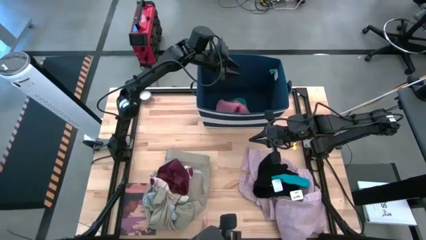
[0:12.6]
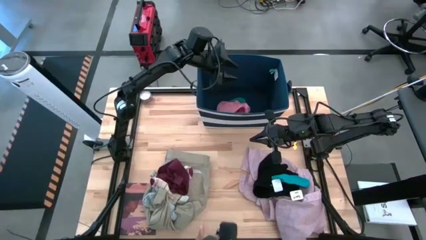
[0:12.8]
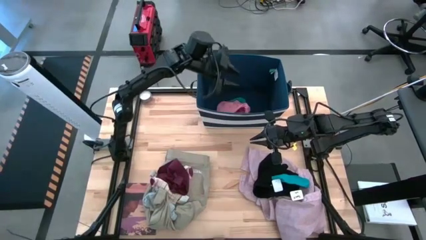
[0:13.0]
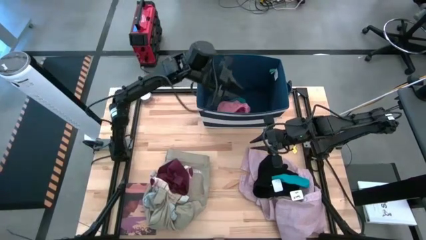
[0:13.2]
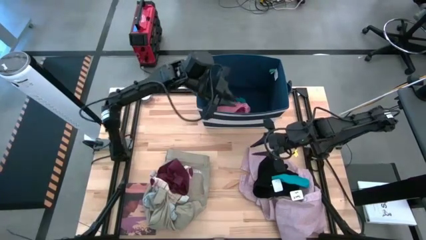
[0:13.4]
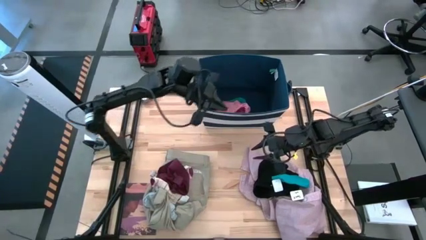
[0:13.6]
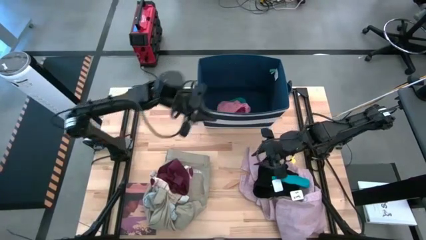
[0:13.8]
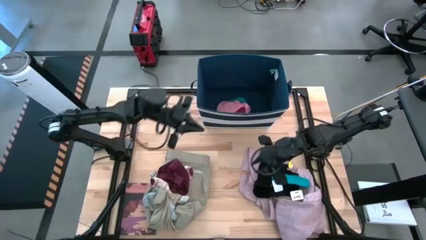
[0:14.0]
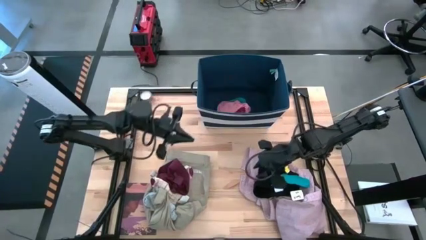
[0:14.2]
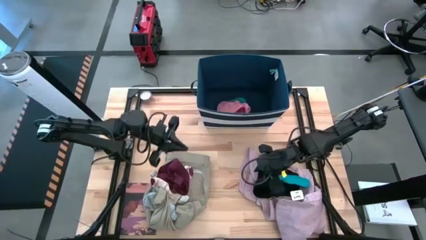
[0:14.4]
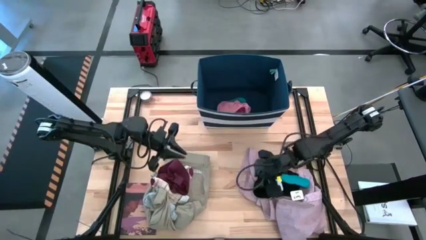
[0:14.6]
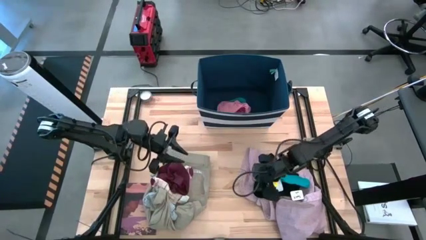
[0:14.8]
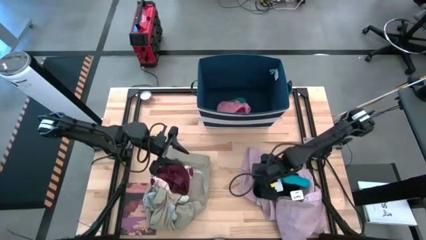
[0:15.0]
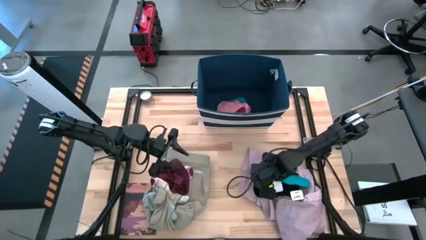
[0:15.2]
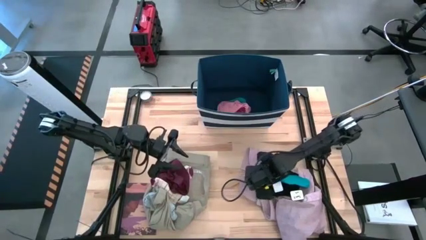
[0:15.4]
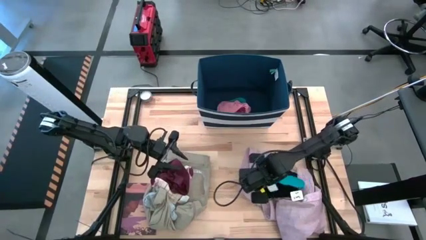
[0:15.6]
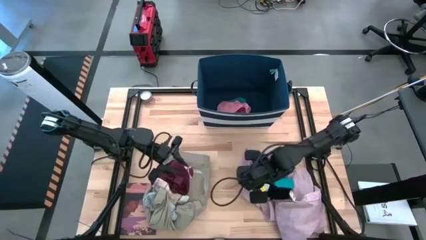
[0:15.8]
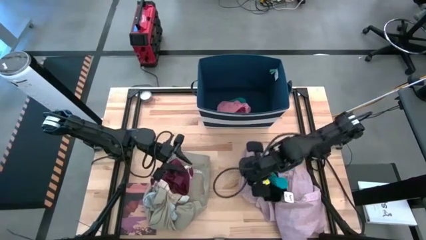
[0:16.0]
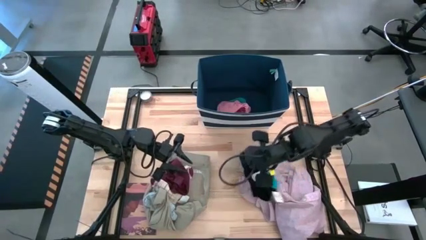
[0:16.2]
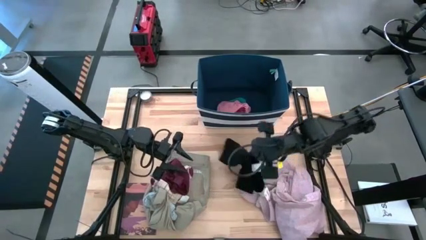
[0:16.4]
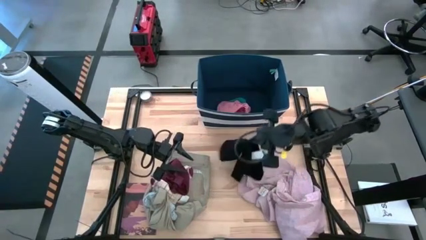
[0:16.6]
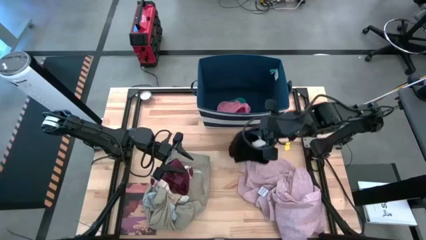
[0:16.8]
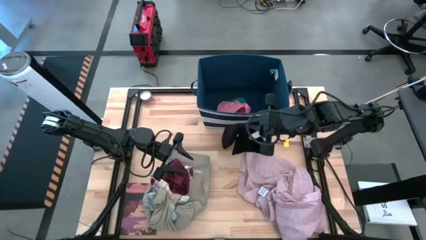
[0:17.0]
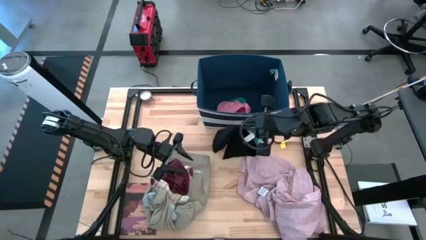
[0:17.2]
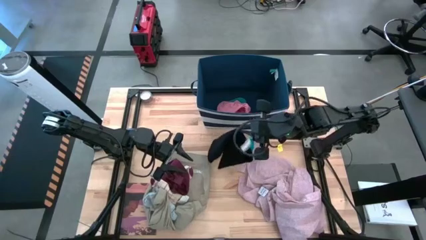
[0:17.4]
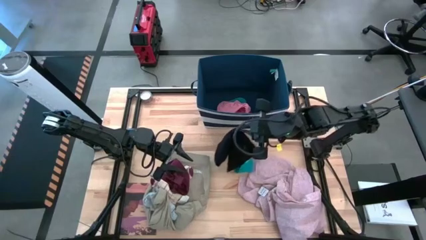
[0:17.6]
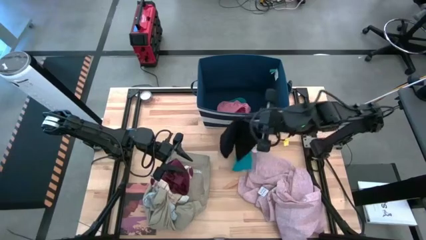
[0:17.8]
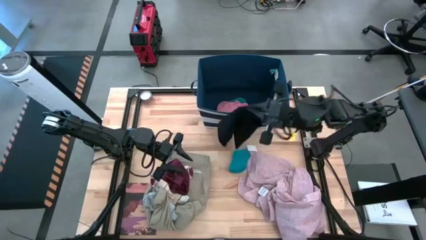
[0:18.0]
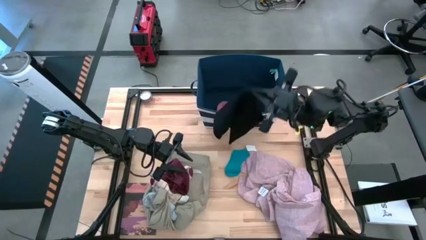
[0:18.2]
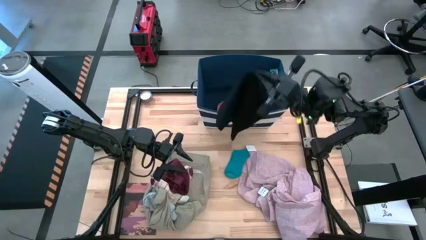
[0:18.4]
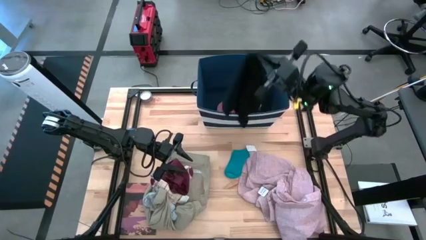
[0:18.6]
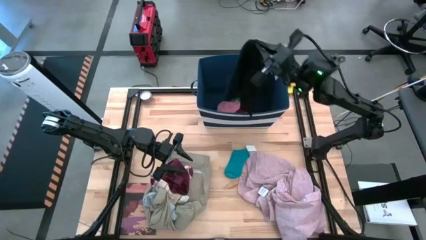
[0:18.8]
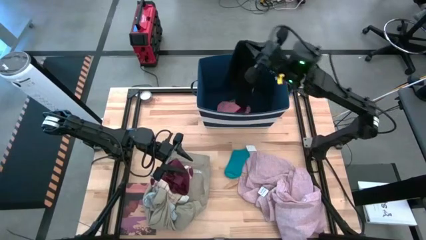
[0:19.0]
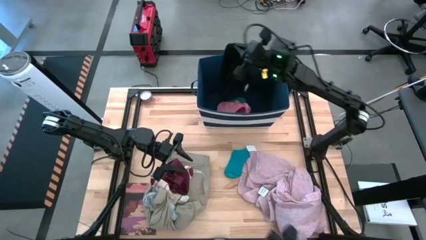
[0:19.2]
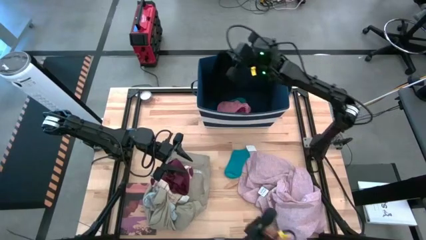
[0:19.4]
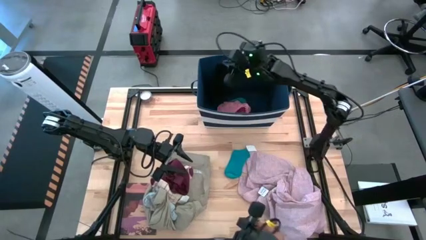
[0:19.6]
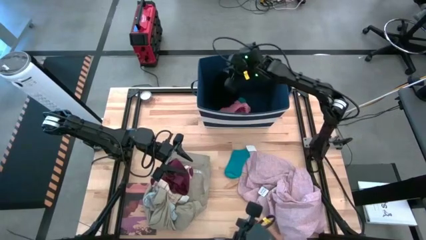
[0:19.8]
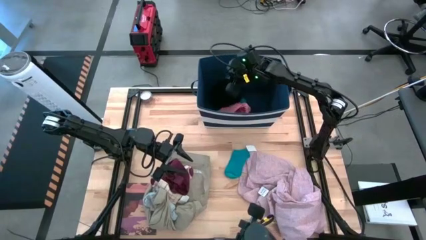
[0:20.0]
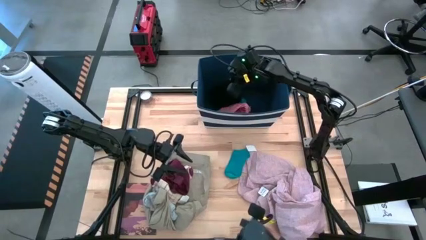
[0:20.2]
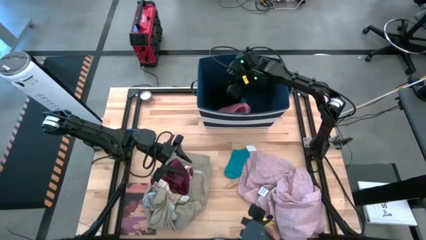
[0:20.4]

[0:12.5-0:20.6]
Task: Sort clothes
Put the black underwear into the laundry bin

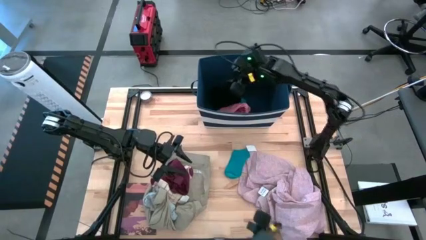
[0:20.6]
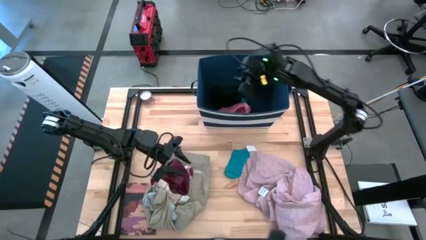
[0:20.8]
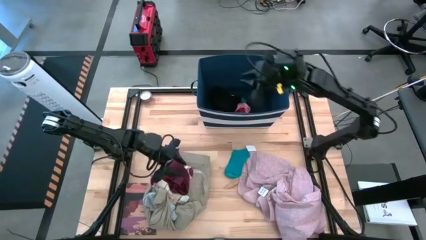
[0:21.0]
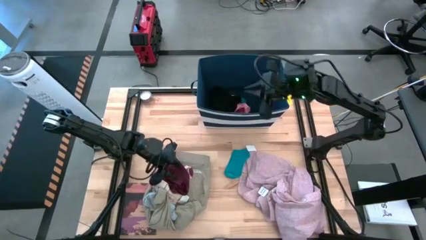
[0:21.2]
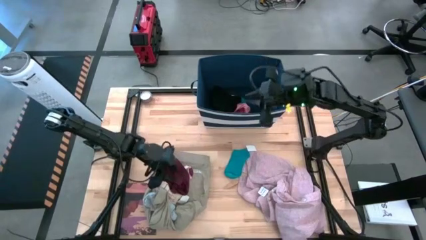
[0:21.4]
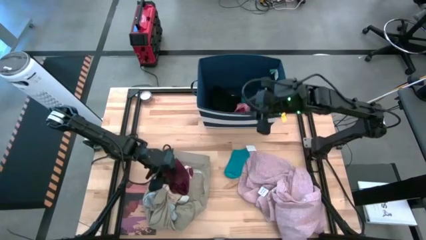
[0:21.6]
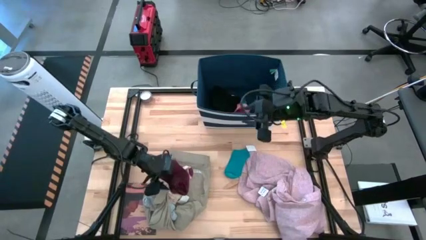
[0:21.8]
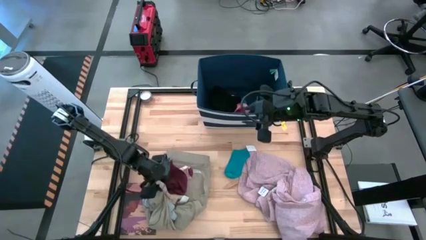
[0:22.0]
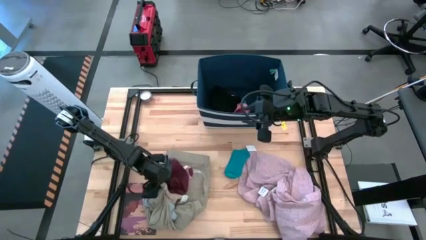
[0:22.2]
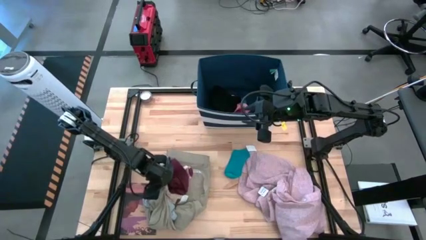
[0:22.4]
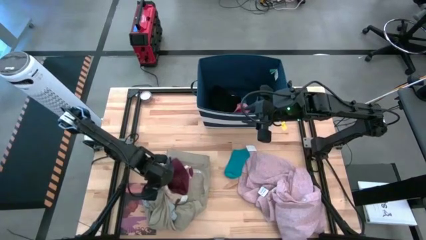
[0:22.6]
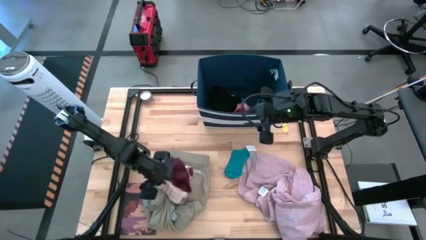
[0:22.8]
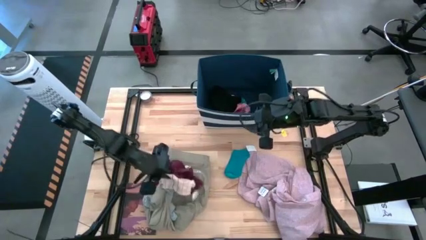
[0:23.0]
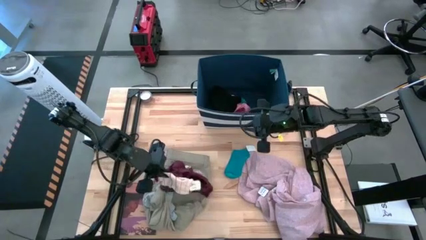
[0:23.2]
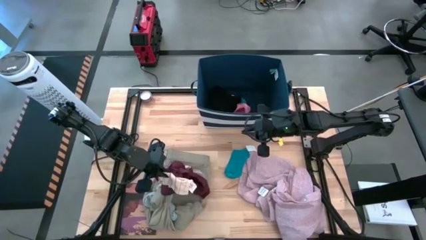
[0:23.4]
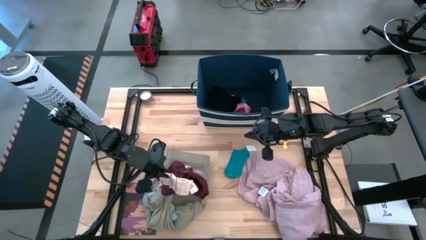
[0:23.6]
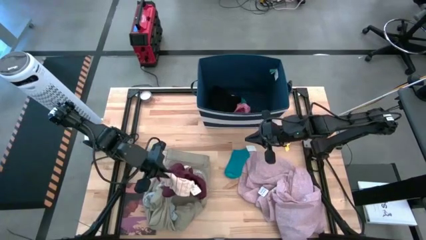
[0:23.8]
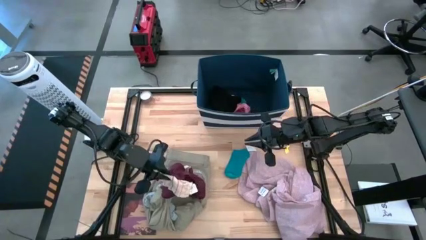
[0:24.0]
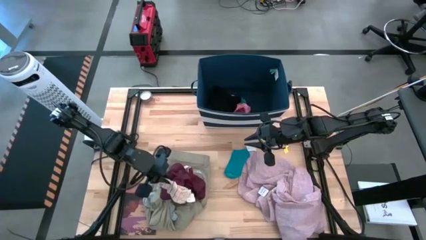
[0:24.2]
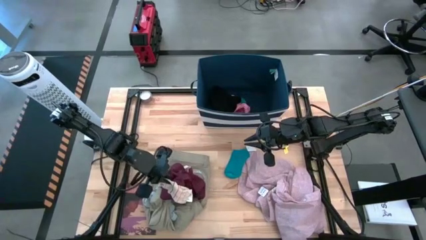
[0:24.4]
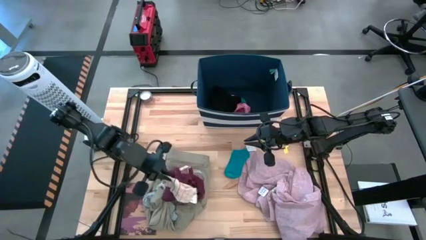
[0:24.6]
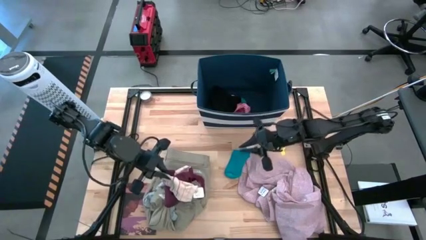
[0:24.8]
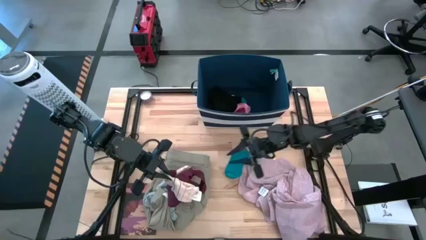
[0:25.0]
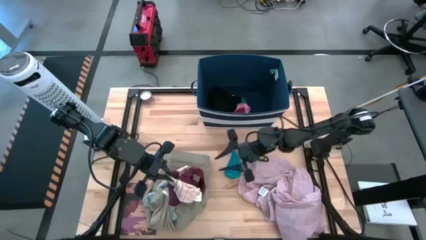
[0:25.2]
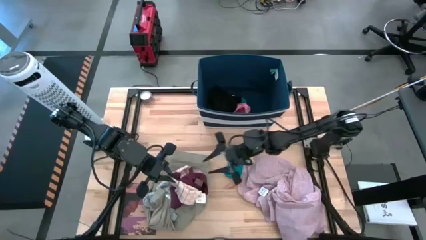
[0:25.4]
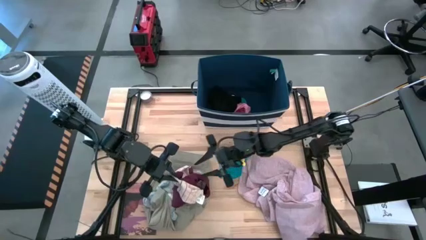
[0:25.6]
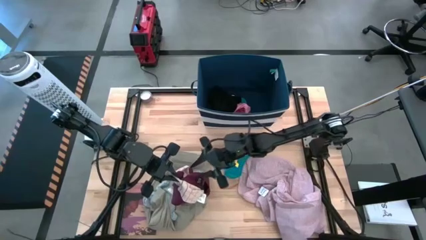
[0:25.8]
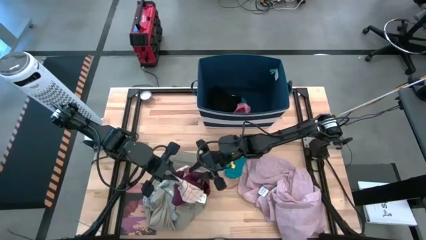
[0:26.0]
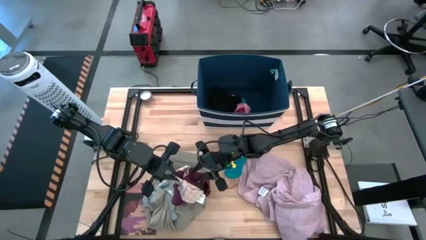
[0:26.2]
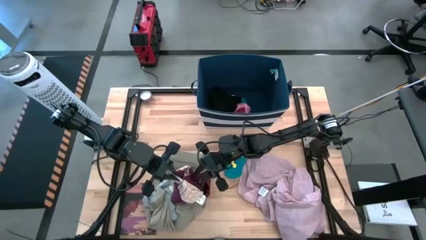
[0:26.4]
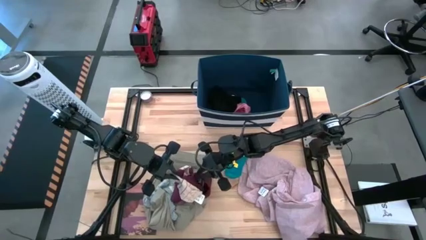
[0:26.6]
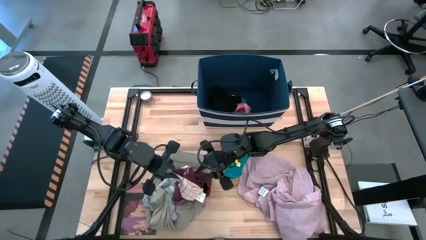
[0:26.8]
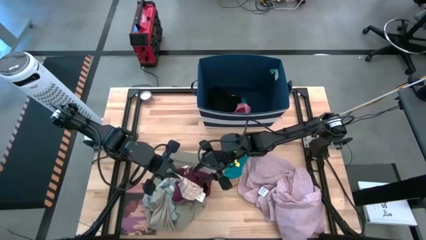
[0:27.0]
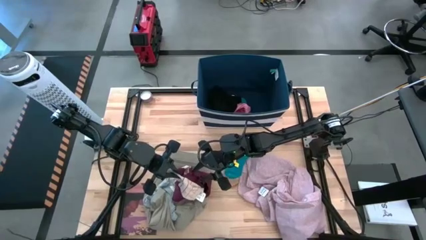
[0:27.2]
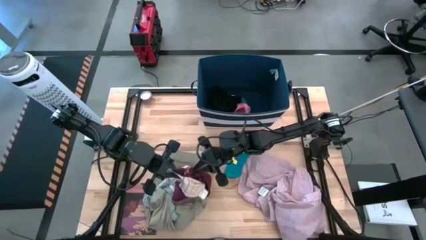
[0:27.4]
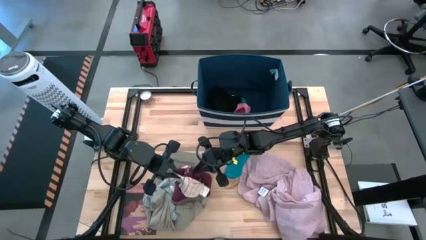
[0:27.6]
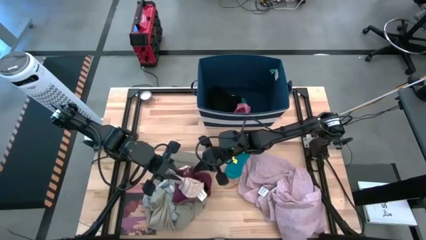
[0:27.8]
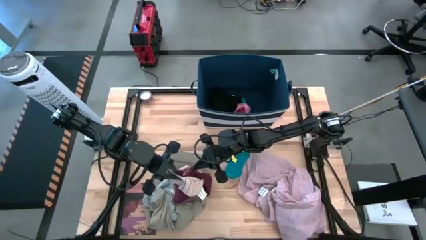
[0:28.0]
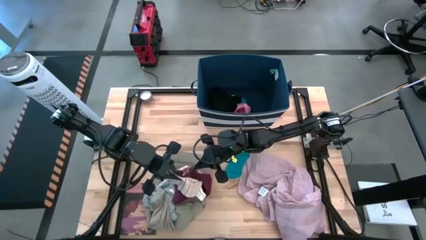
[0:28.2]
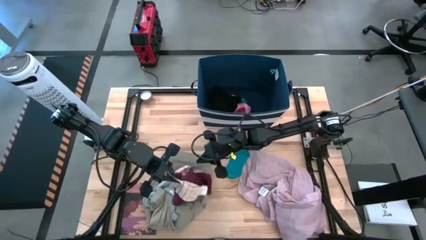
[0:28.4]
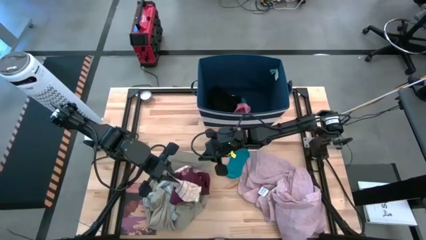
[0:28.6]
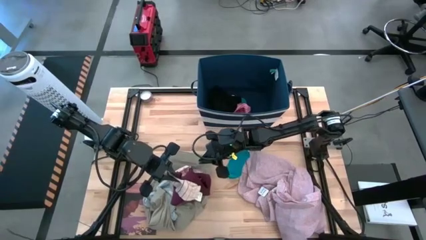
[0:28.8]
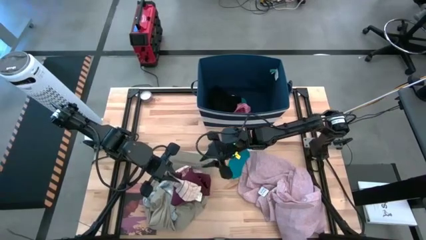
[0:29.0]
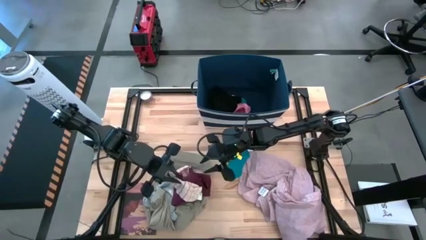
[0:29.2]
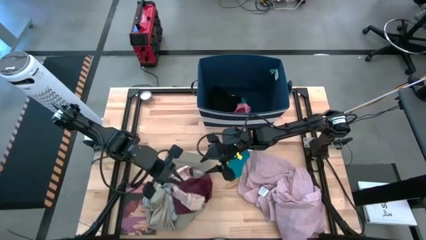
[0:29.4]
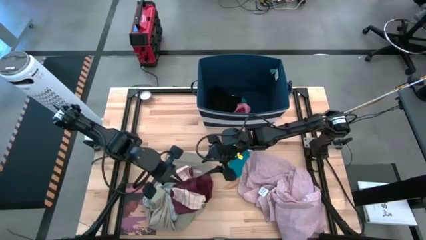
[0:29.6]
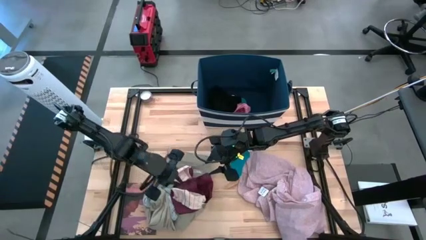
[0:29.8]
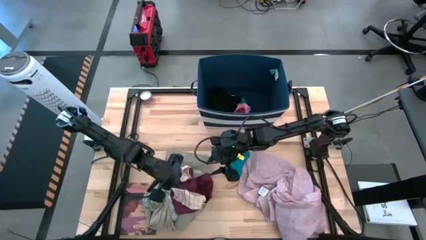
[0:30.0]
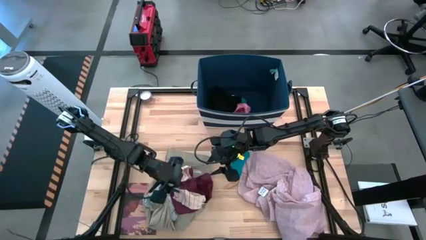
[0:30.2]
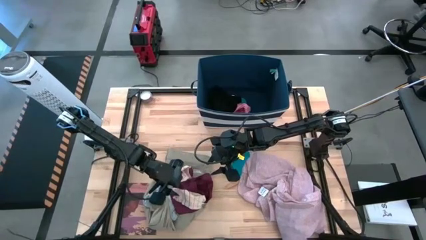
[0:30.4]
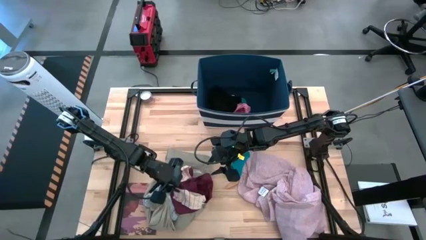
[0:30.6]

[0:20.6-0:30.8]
Put the bottom white patterned sock into the laundry bin
